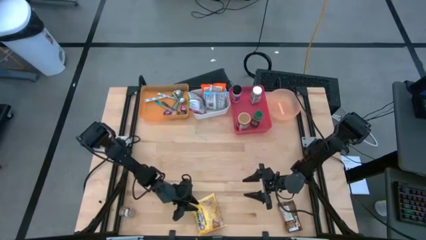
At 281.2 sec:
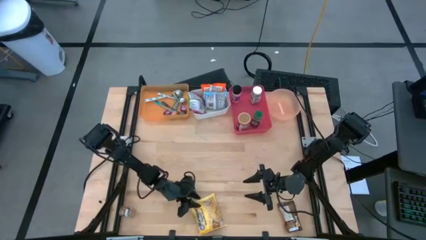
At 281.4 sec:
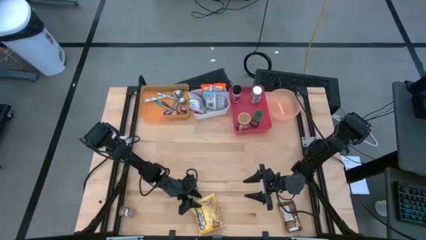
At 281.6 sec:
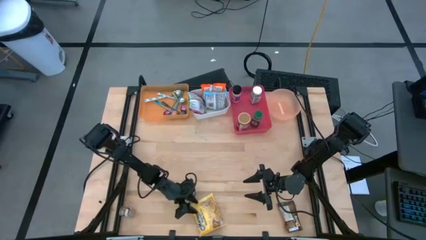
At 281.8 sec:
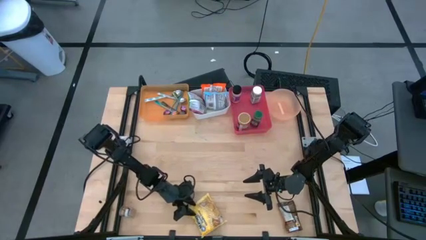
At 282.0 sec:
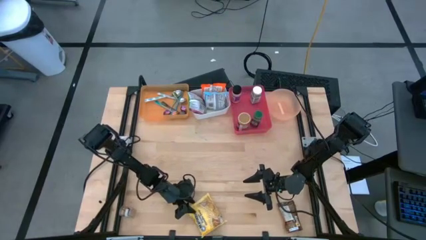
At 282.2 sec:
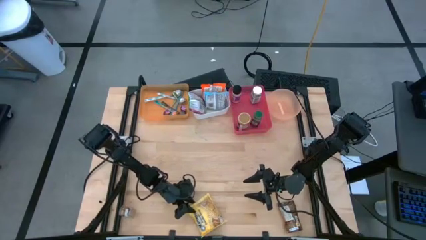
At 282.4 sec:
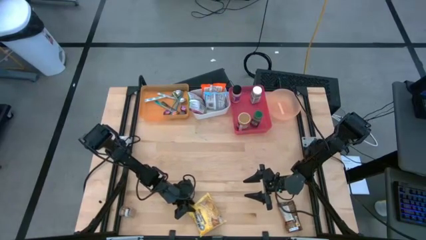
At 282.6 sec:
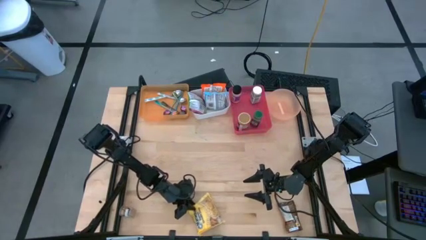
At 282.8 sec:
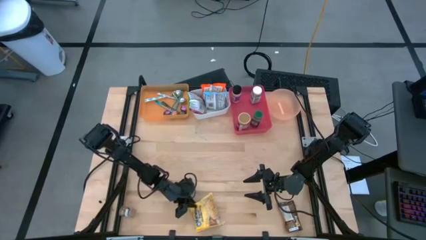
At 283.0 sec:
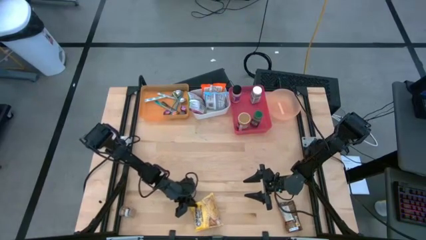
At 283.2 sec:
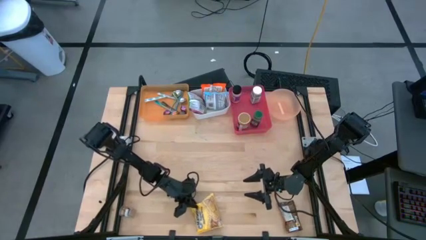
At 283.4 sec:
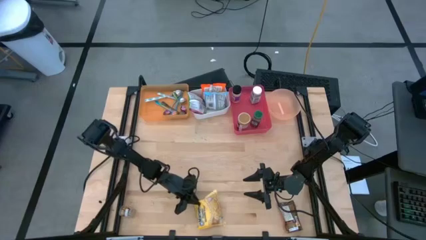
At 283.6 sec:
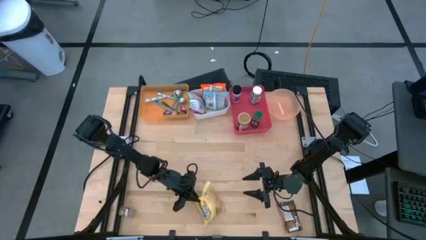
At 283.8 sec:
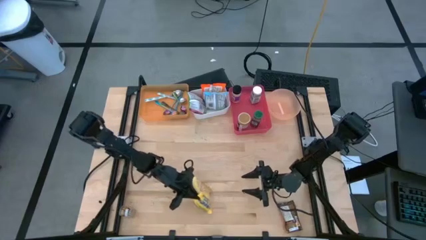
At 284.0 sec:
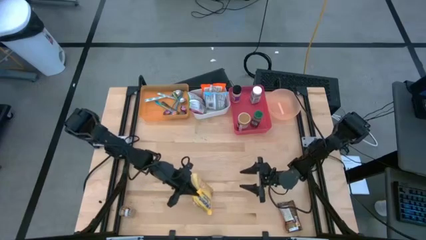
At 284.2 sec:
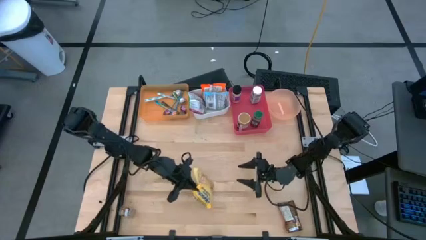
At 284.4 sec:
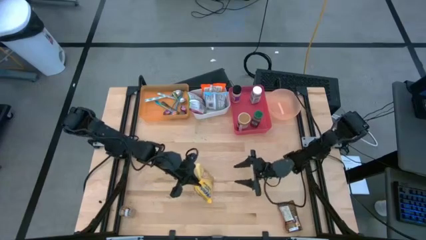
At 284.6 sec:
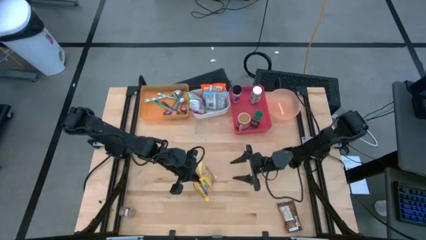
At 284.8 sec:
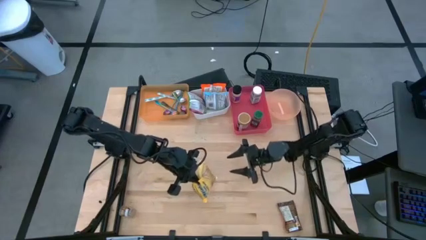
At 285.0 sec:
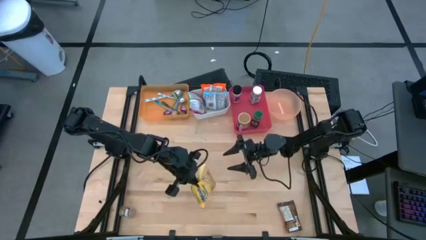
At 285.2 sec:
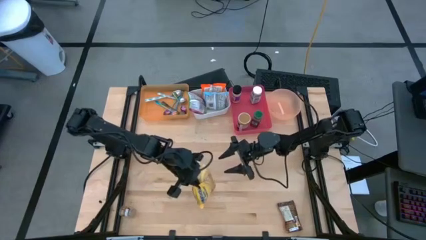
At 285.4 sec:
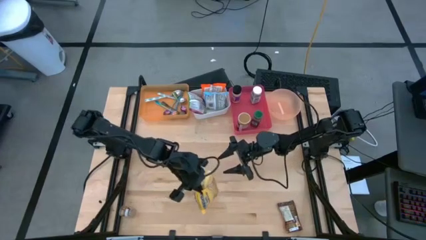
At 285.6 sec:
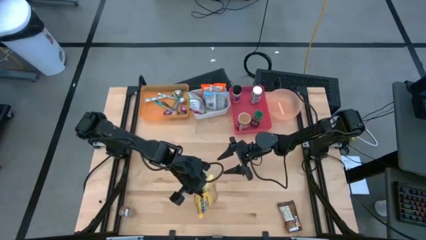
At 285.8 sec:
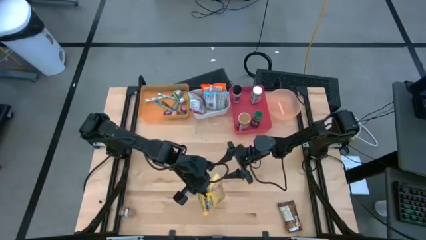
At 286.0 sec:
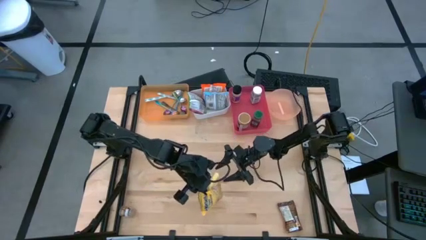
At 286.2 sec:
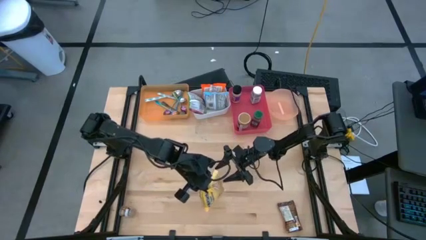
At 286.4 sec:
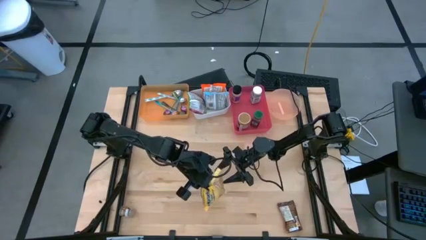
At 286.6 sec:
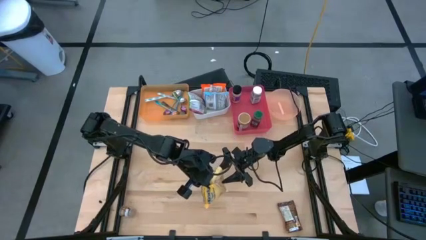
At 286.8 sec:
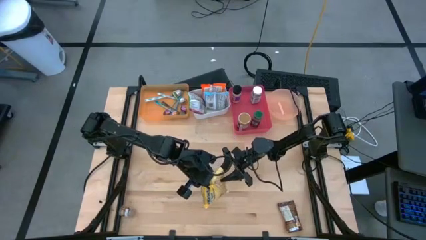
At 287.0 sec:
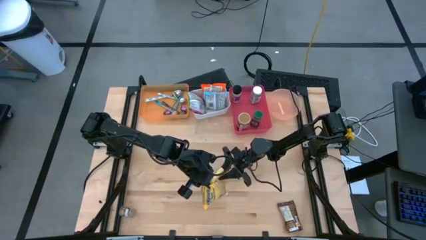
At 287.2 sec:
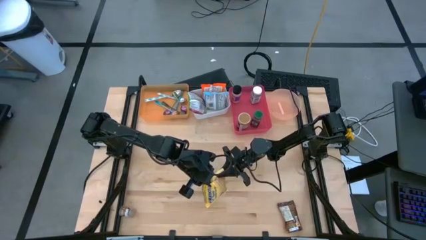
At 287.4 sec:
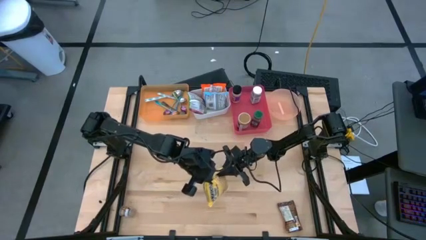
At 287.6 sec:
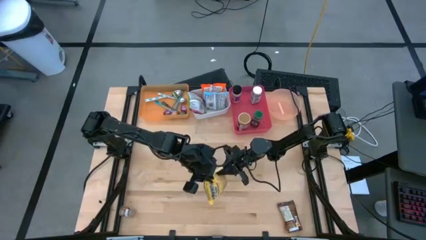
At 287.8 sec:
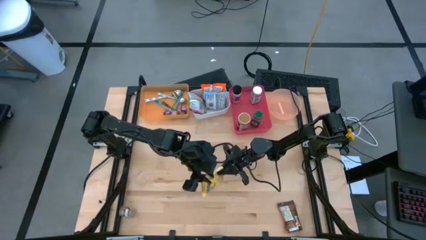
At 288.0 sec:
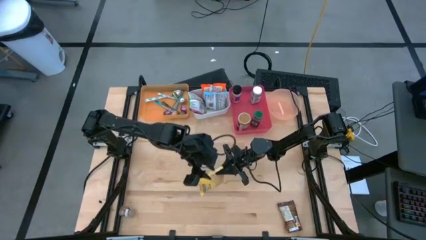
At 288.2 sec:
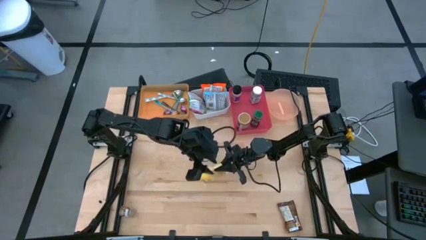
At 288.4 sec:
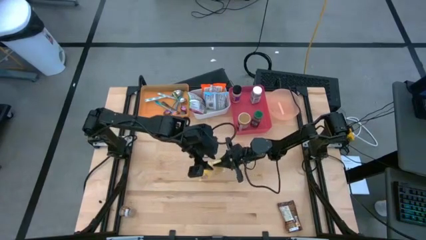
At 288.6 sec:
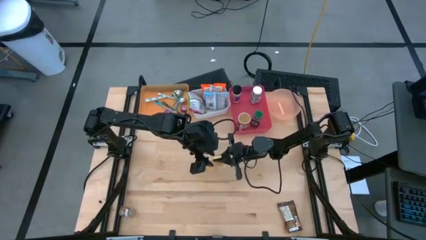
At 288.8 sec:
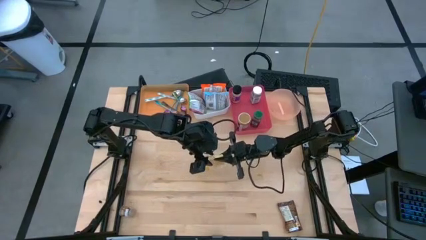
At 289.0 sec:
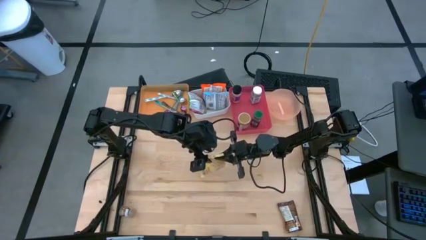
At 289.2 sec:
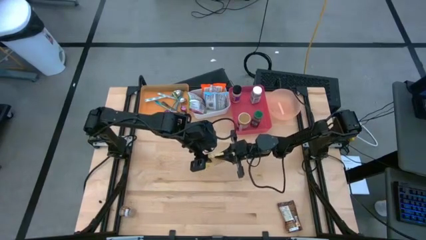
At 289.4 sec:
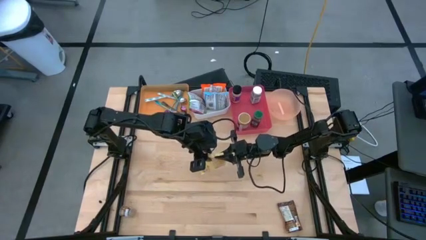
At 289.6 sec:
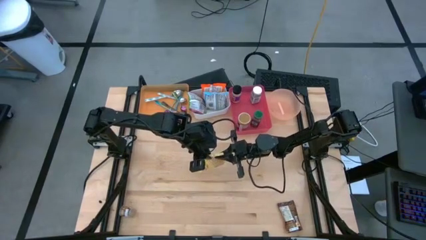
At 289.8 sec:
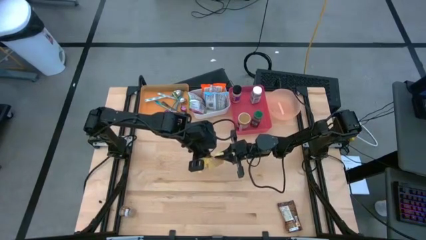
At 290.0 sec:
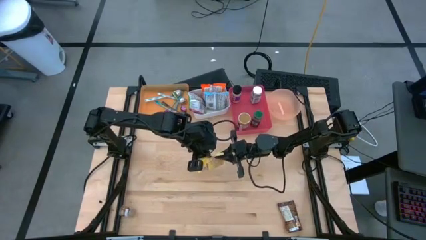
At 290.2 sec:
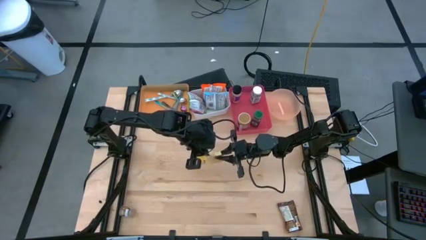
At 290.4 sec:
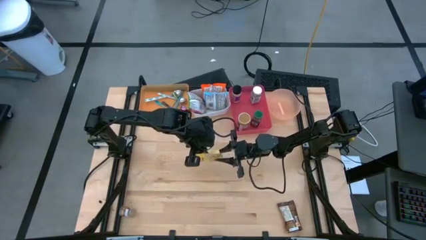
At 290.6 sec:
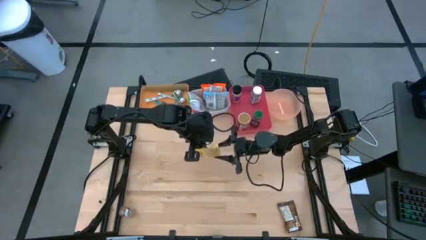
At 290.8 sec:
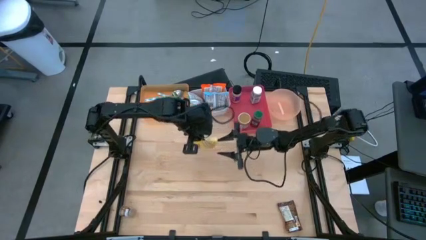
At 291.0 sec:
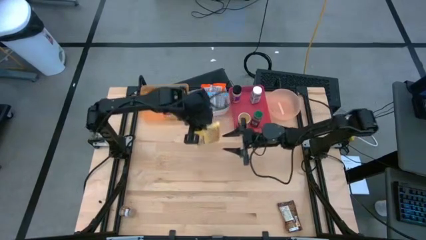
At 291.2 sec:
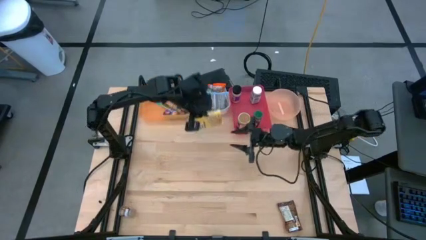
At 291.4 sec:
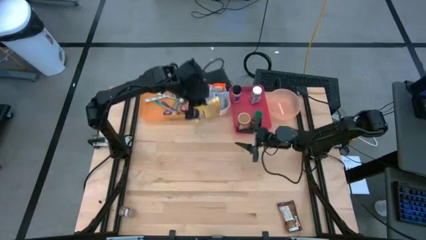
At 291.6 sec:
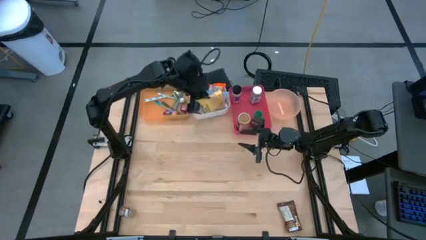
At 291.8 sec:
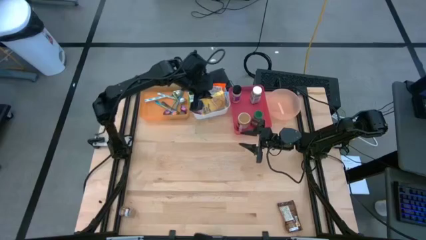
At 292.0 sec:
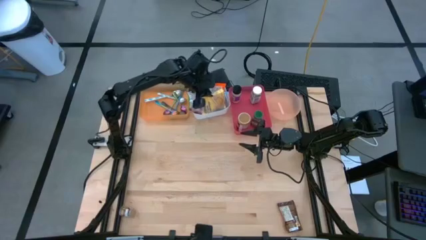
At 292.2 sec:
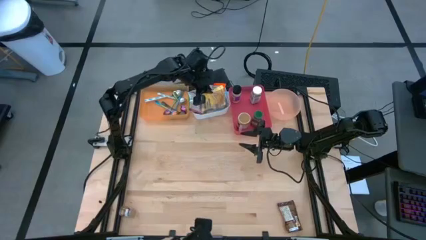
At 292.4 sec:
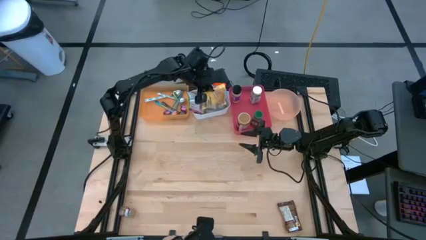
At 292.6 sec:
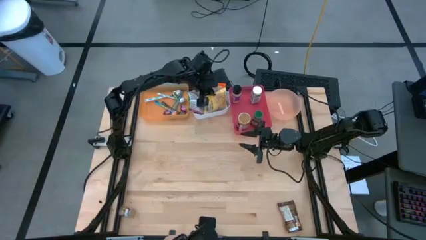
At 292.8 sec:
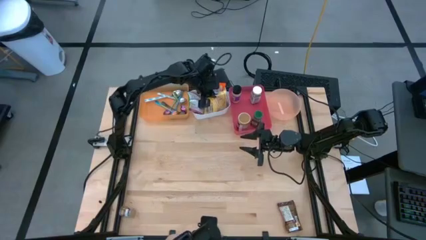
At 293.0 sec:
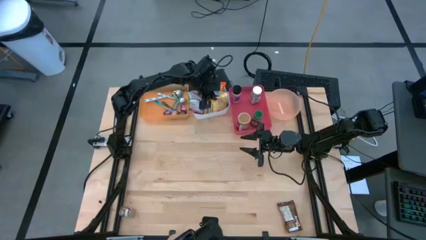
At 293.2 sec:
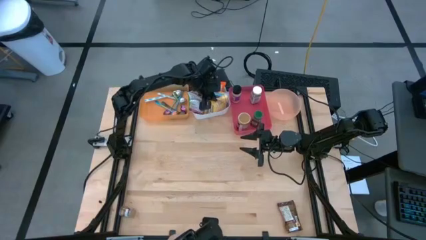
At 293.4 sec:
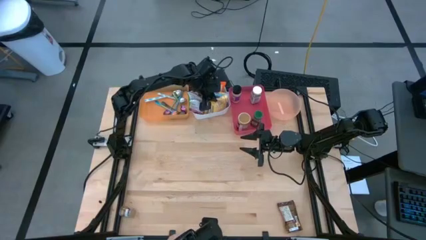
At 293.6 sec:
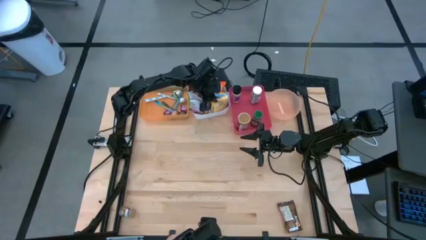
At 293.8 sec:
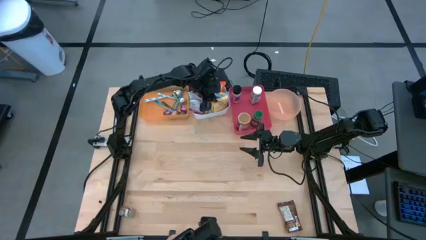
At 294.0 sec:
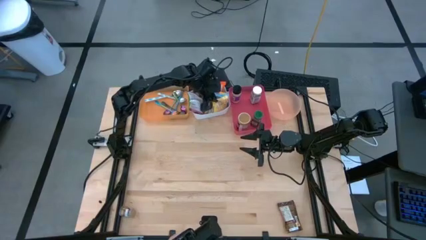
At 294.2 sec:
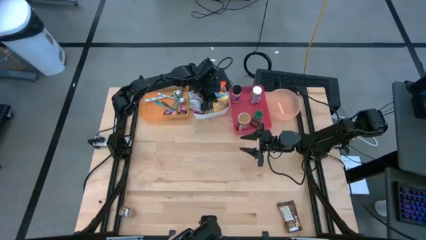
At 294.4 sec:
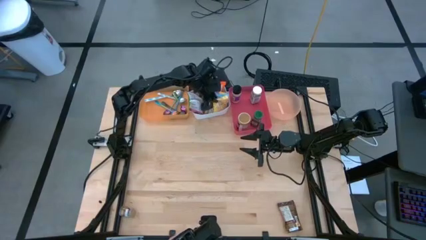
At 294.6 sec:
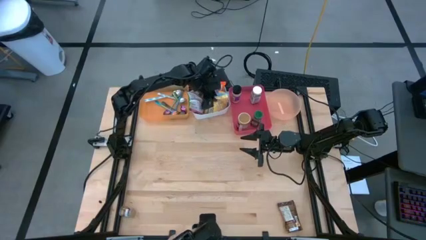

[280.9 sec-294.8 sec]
Task: Pick & Place Food Item
Put the yellow noodle pack into the white bin
